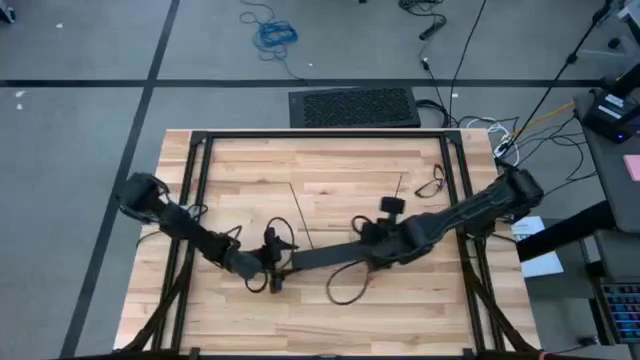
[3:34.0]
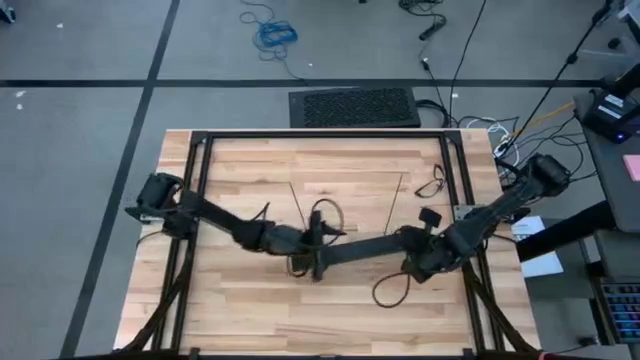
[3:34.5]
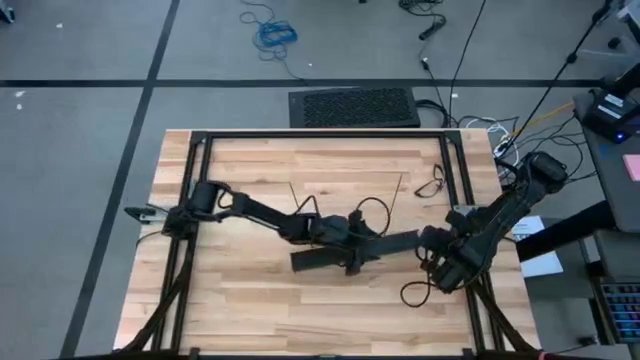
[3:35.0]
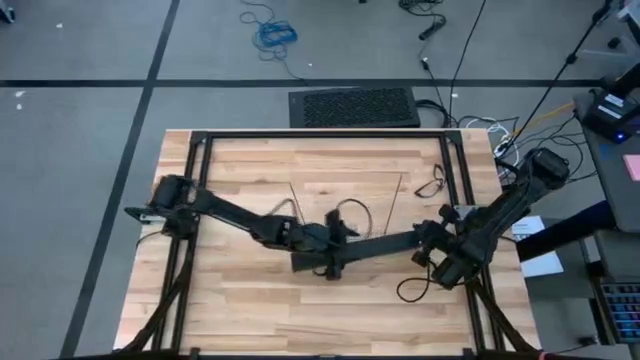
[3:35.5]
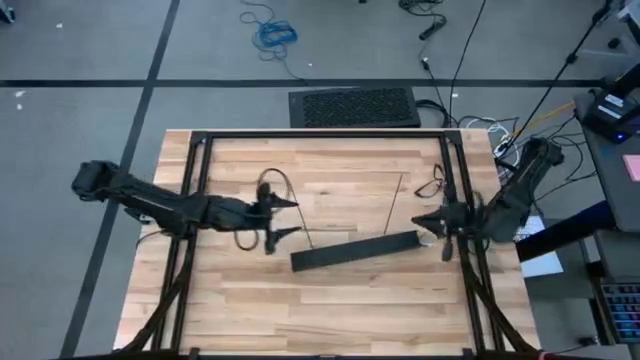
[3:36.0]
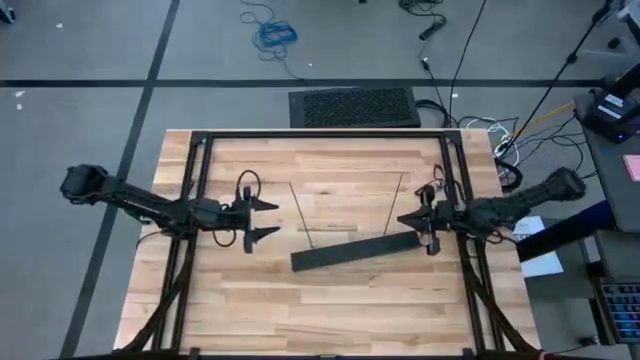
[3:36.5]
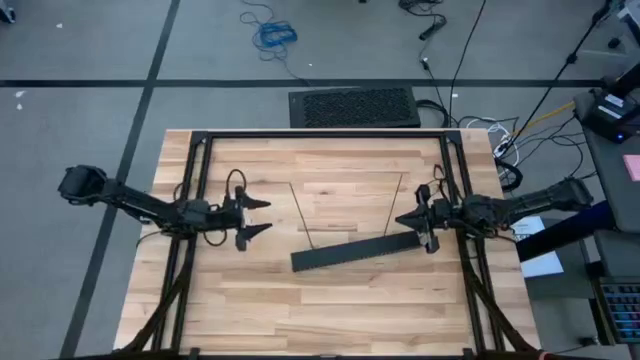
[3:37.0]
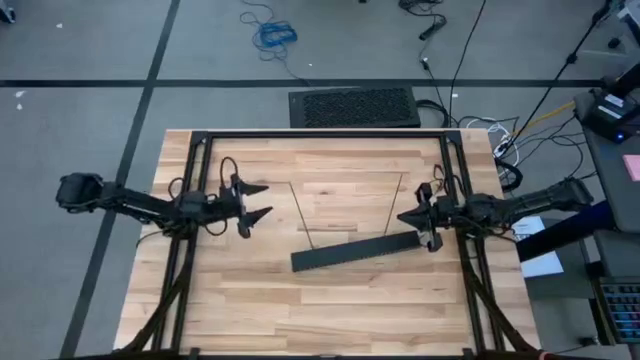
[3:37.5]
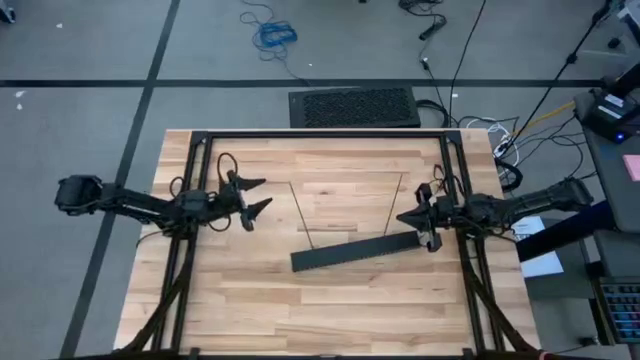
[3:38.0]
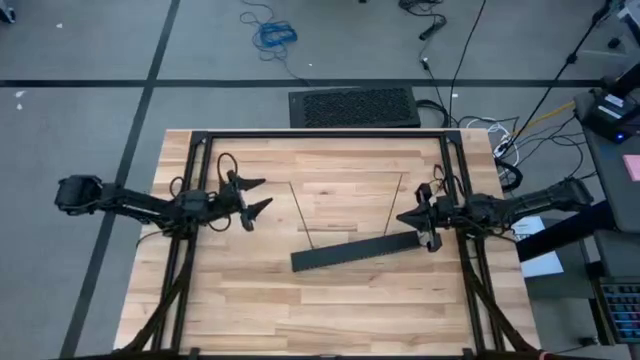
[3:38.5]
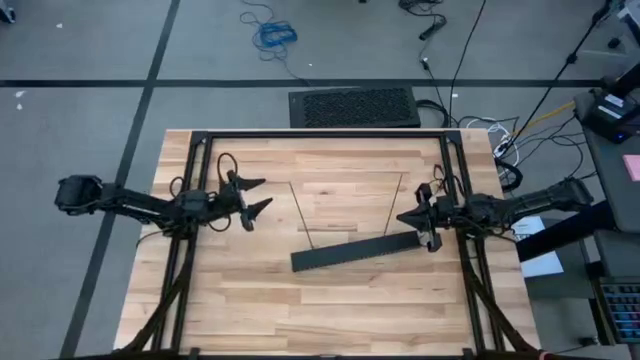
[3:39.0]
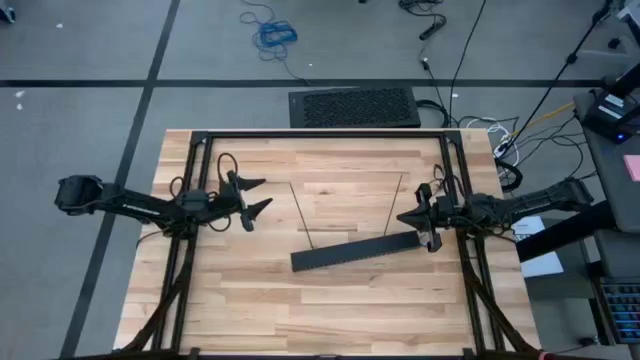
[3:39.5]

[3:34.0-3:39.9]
Task: Ziptie cables
Return to home position

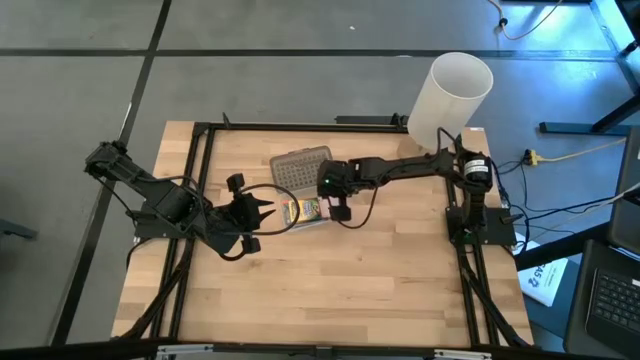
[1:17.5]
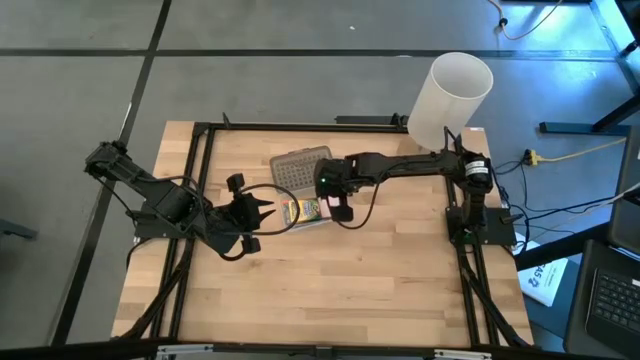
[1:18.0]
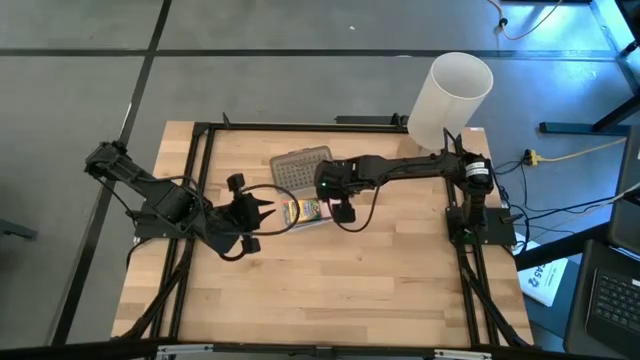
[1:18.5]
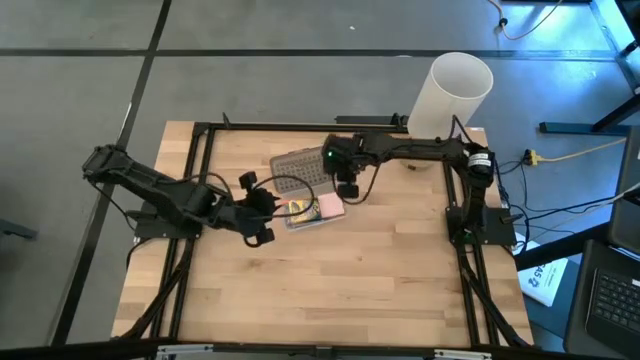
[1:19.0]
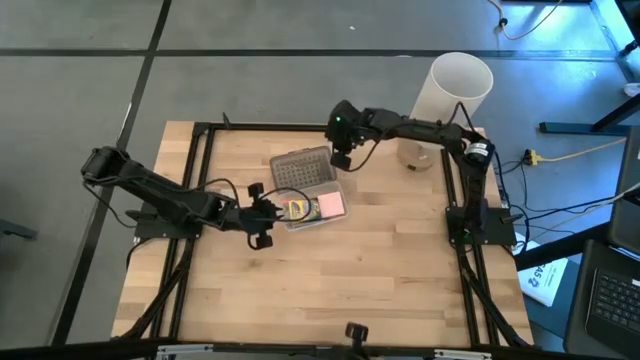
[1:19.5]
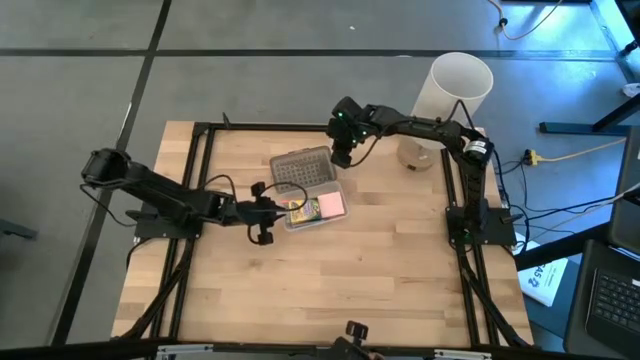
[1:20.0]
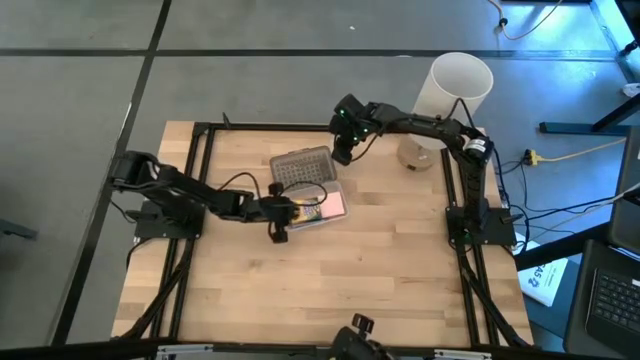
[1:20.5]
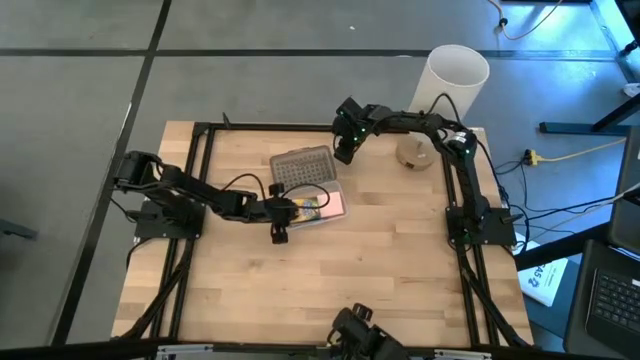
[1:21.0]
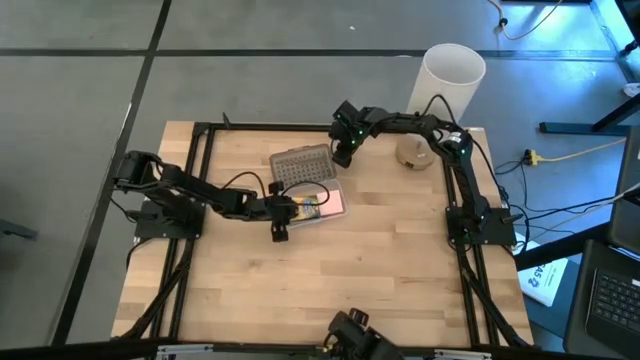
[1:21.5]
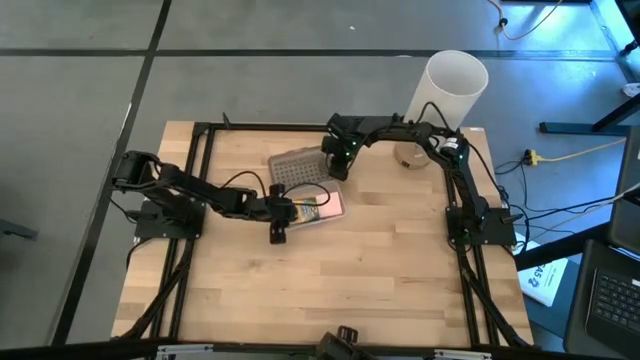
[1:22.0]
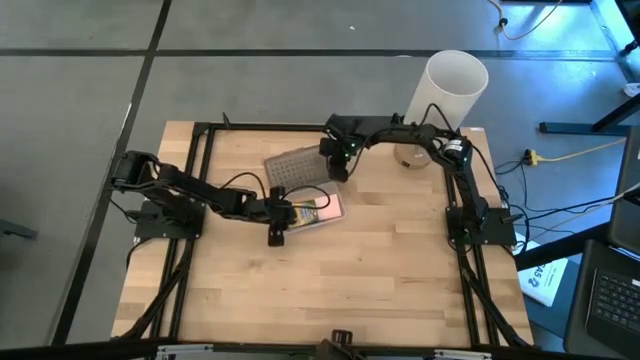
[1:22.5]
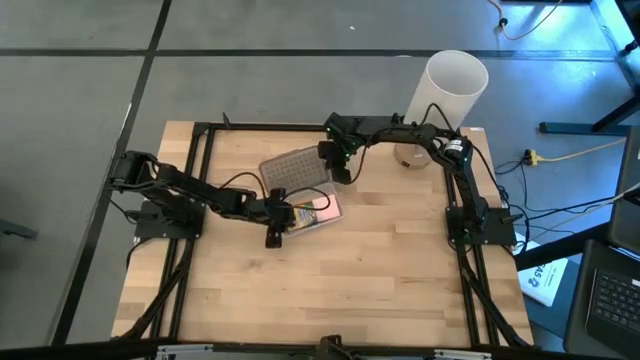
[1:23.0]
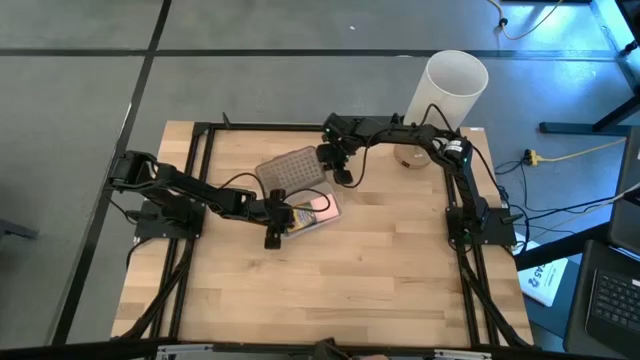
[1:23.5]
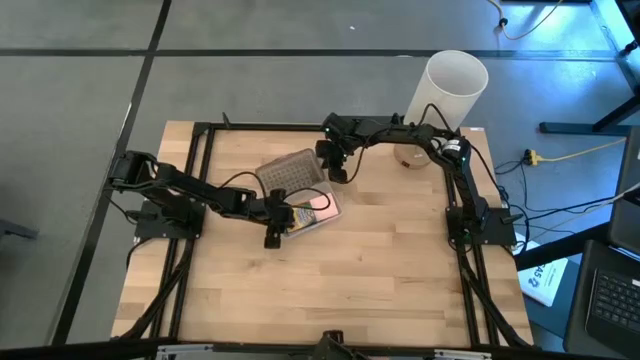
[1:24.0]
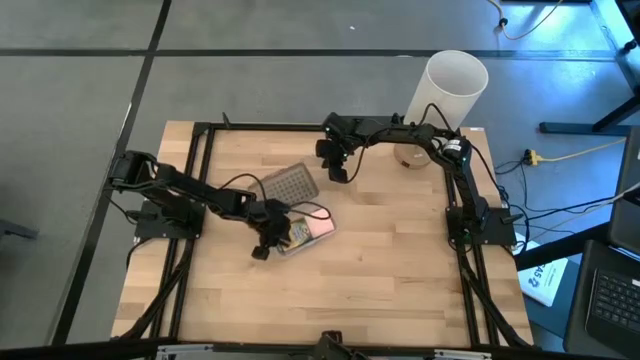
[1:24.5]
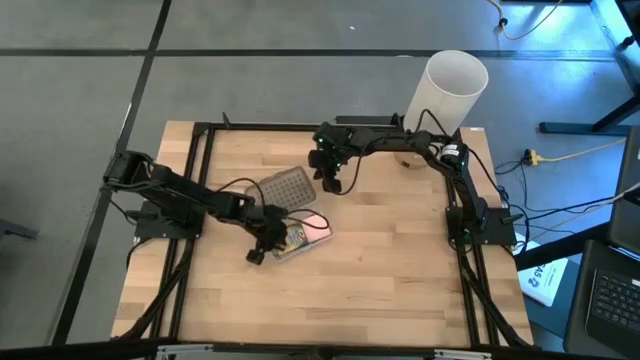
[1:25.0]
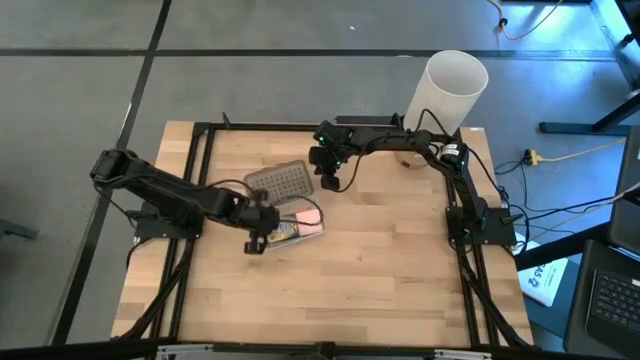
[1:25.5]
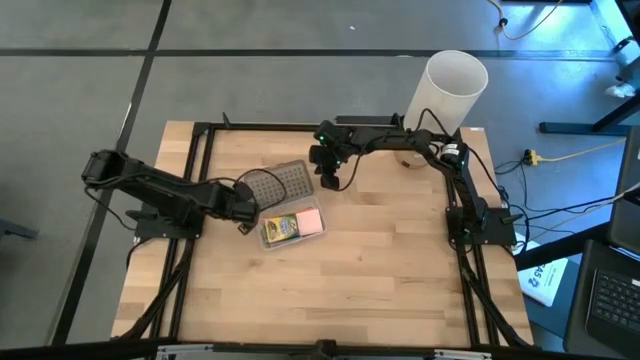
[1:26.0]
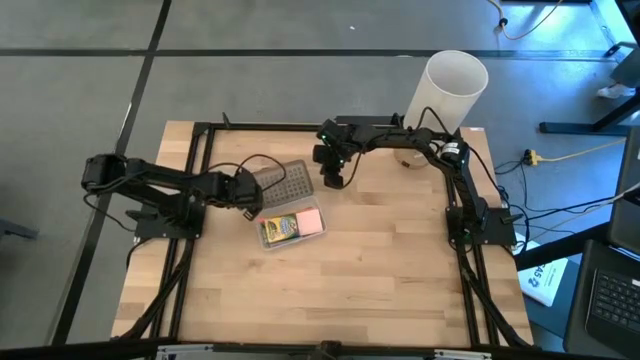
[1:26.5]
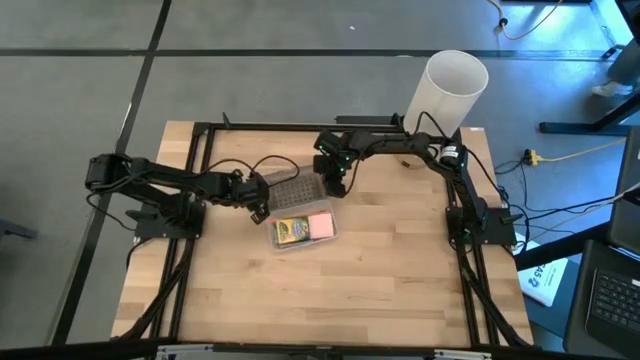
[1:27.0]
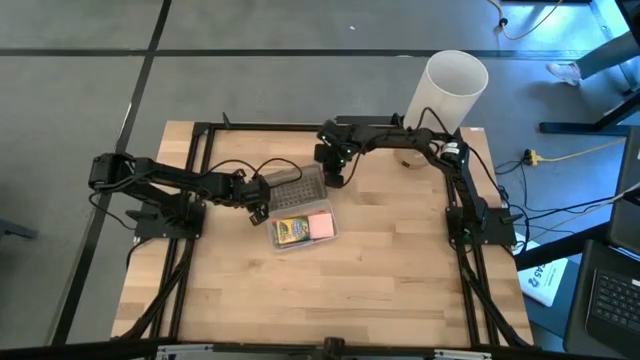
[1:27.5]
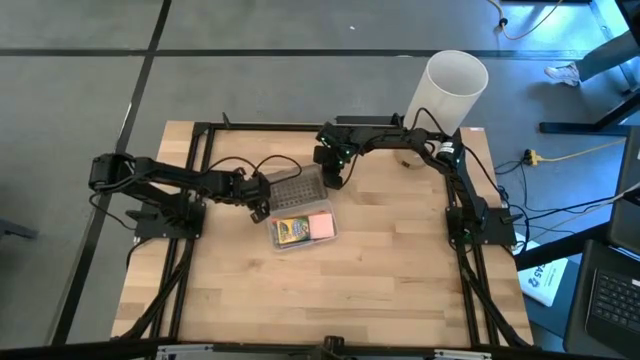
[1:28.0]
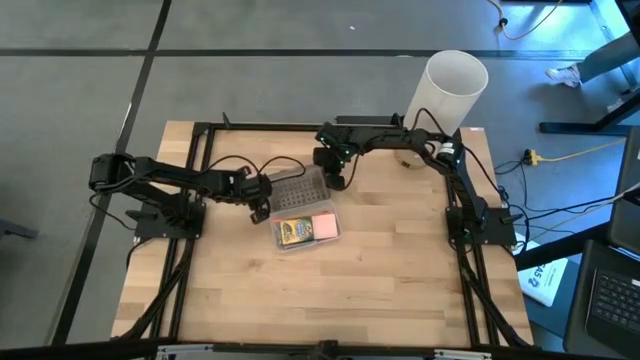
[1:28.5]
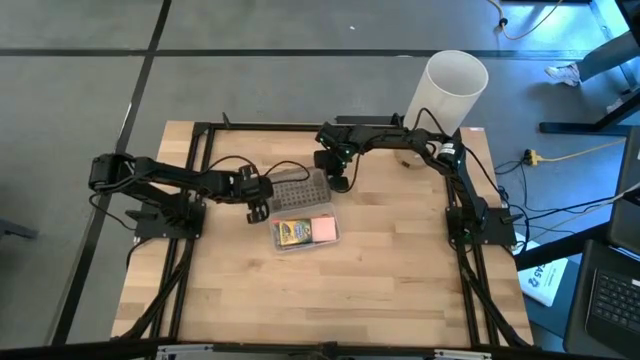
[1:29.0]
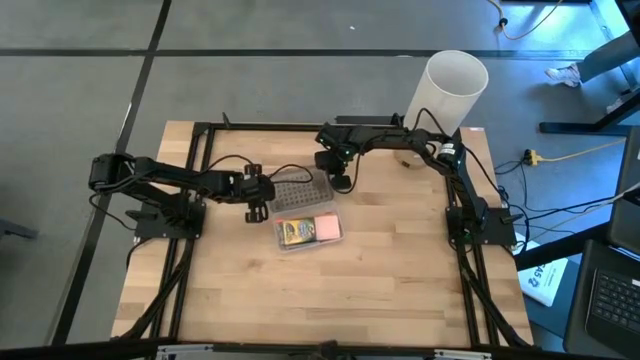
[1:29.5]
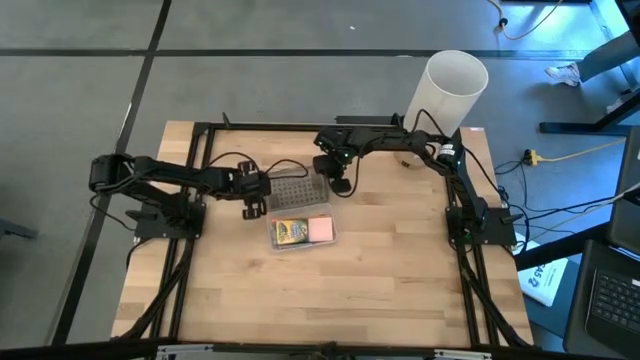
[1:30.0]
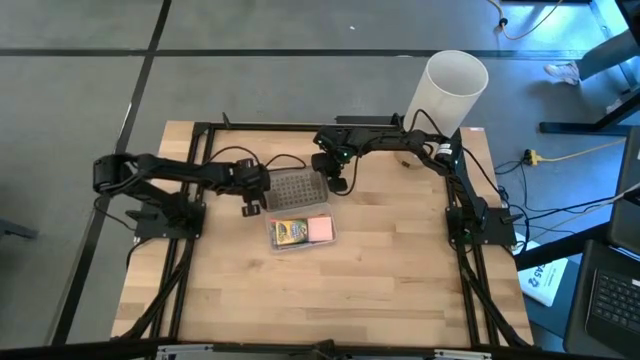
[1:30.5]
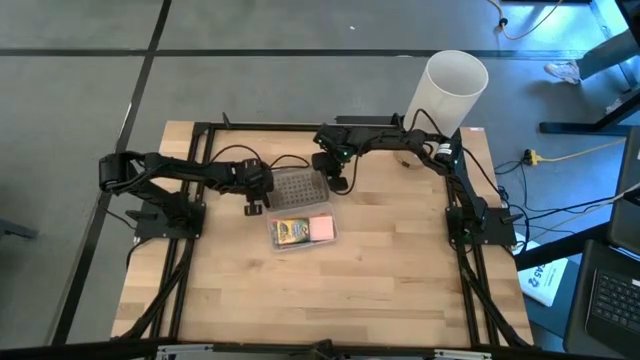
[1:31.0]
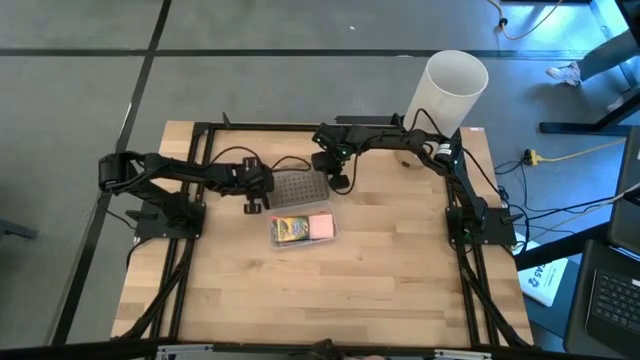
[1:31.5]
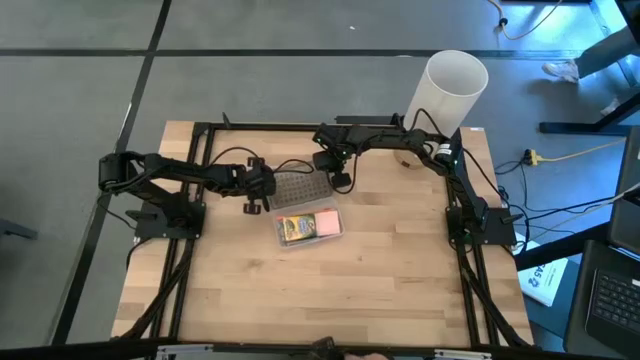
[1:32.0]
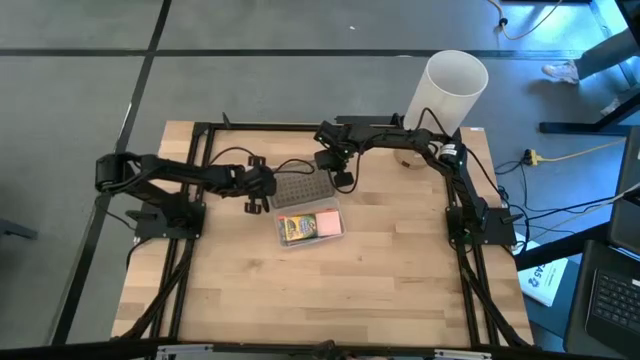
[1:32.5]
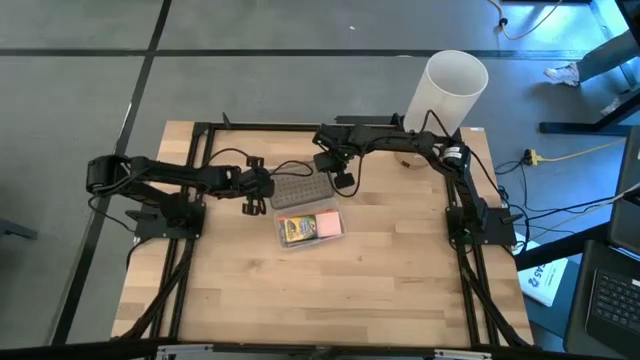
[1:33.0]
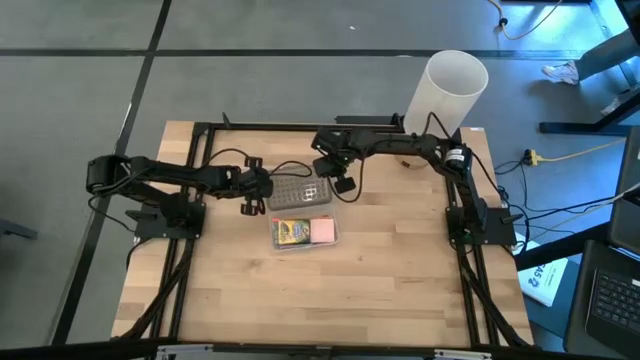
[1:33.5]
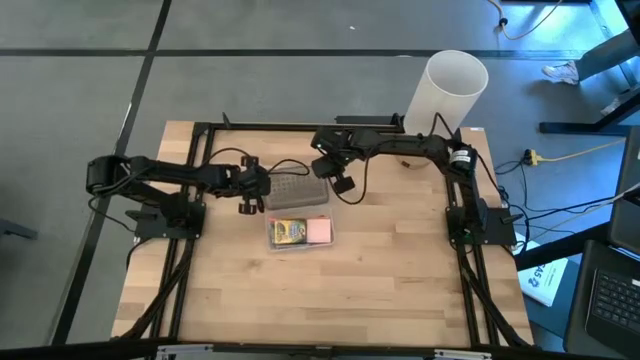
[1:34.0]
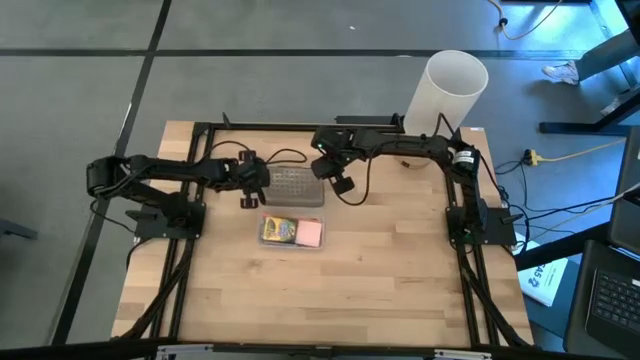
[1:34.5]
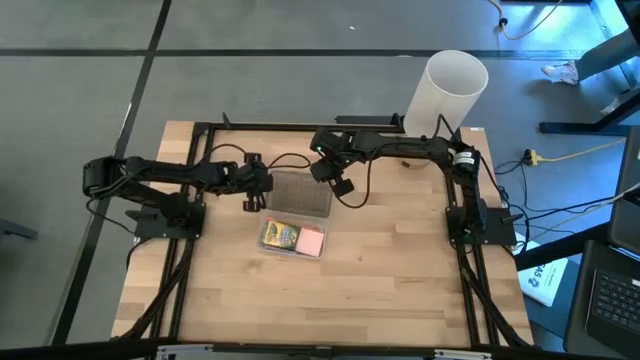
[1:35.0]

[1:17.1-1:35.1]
Task: Pack school essentials
Close the black supply box
